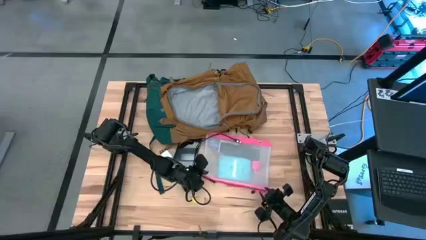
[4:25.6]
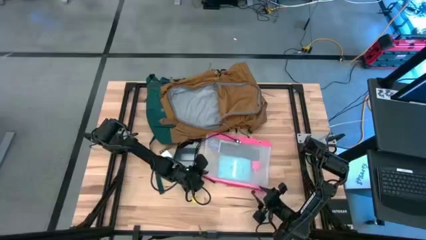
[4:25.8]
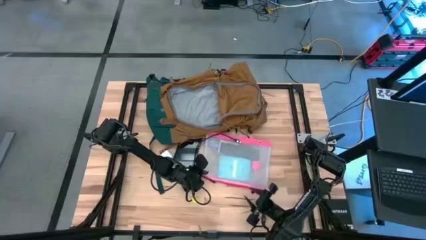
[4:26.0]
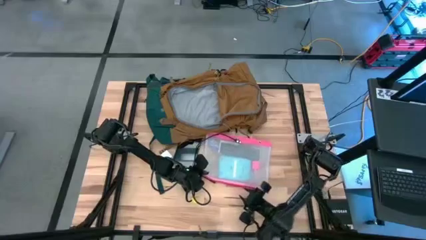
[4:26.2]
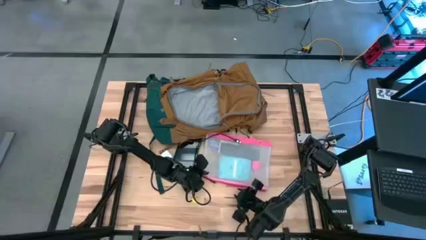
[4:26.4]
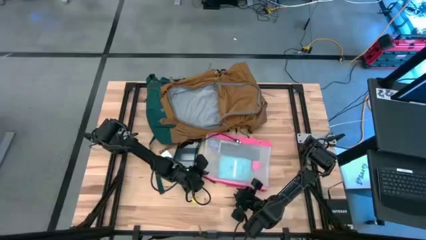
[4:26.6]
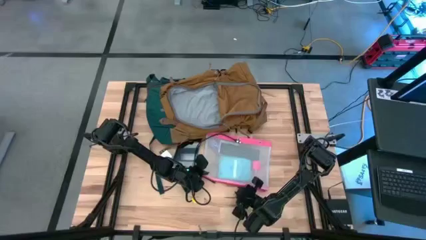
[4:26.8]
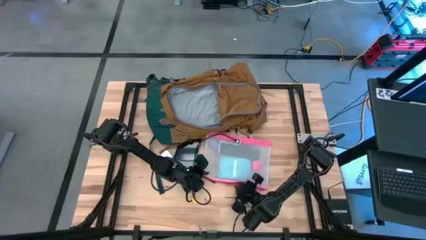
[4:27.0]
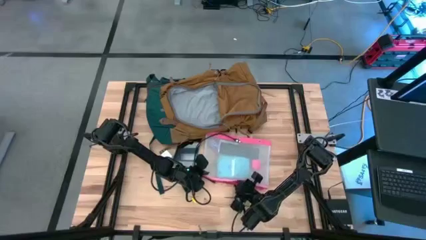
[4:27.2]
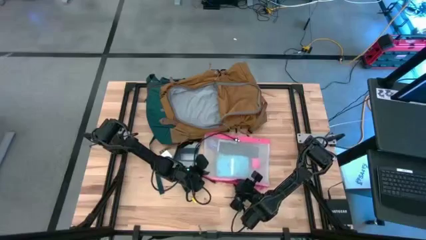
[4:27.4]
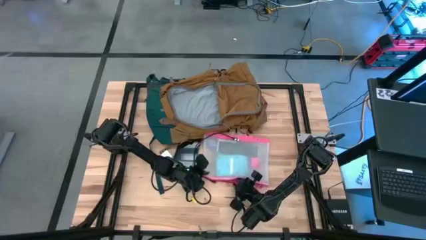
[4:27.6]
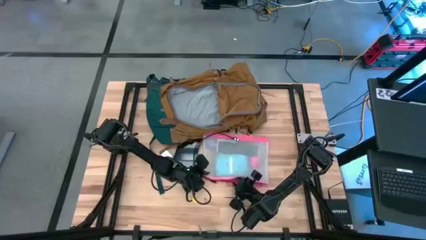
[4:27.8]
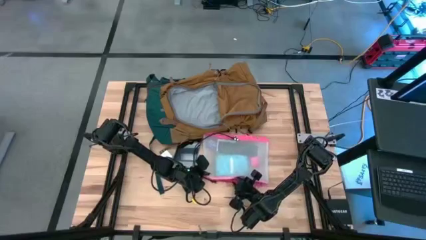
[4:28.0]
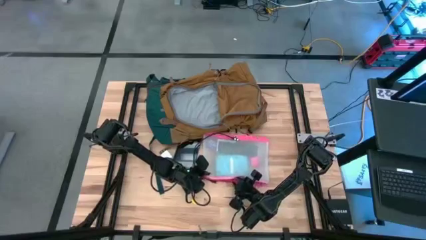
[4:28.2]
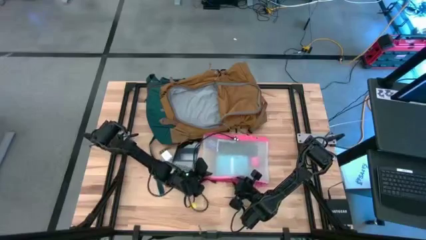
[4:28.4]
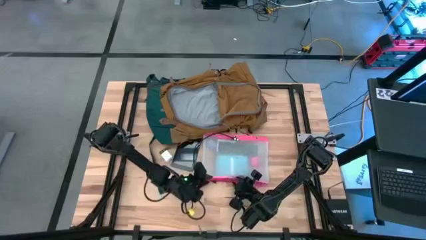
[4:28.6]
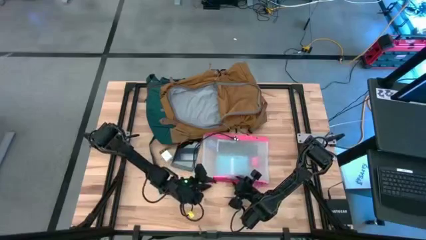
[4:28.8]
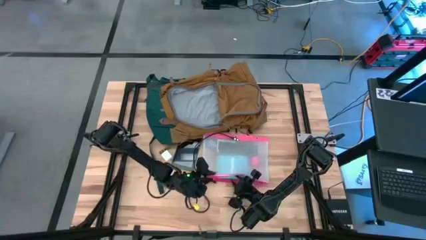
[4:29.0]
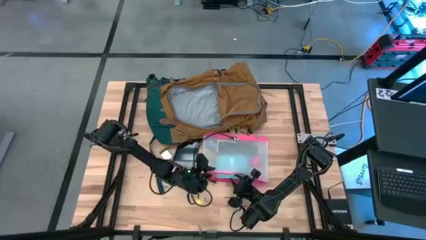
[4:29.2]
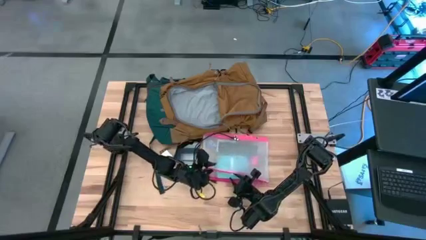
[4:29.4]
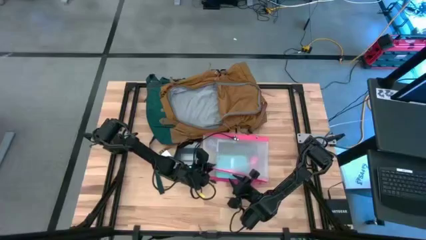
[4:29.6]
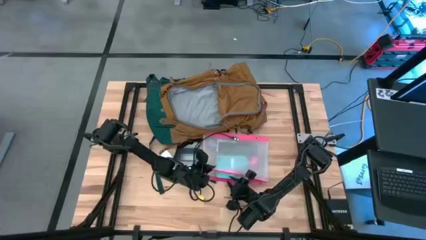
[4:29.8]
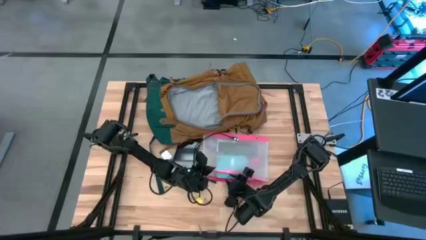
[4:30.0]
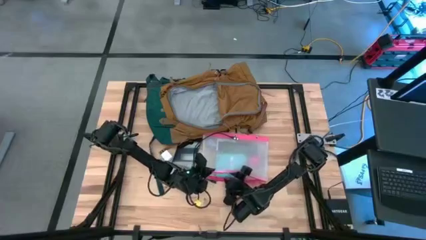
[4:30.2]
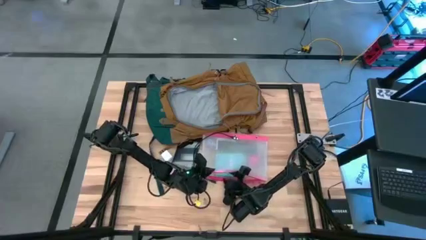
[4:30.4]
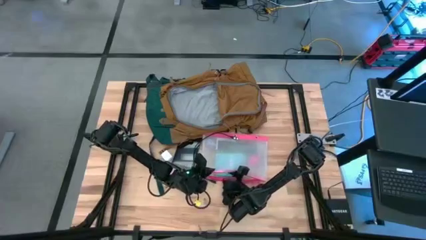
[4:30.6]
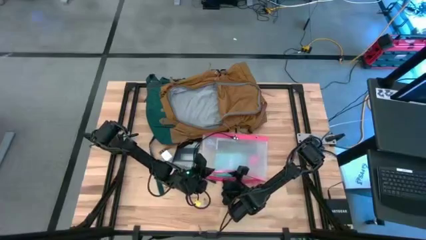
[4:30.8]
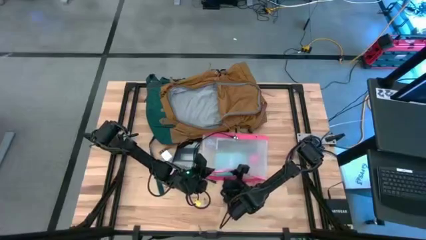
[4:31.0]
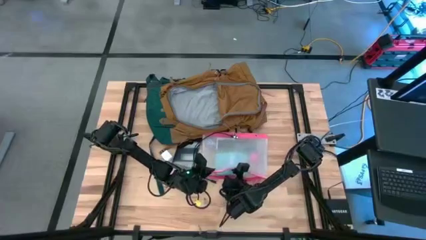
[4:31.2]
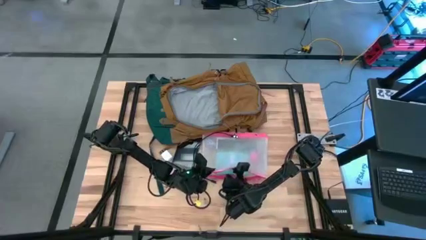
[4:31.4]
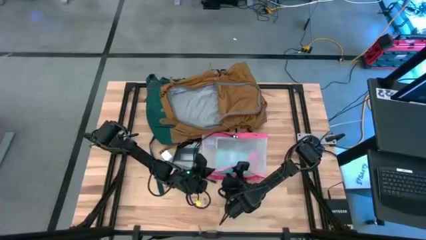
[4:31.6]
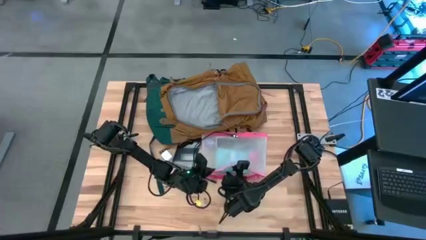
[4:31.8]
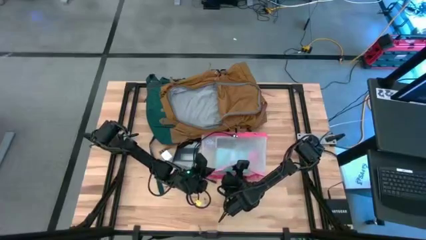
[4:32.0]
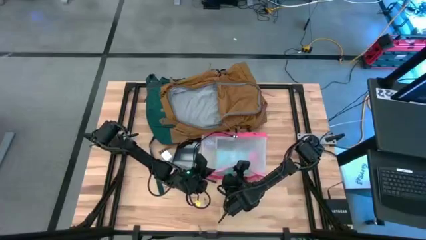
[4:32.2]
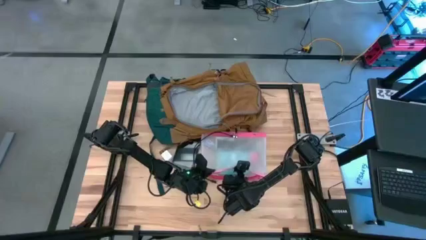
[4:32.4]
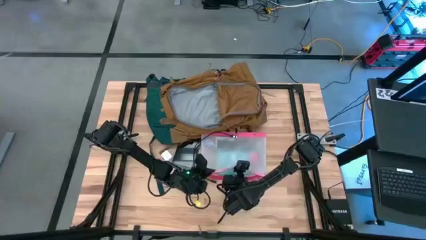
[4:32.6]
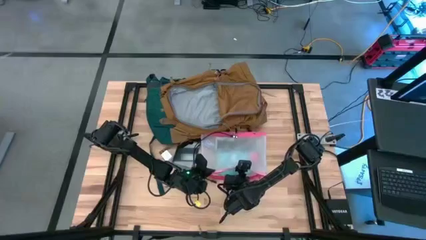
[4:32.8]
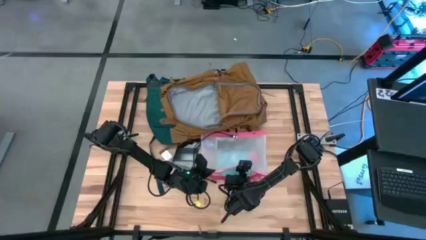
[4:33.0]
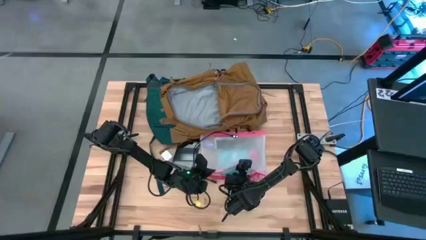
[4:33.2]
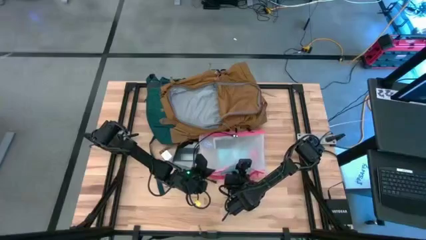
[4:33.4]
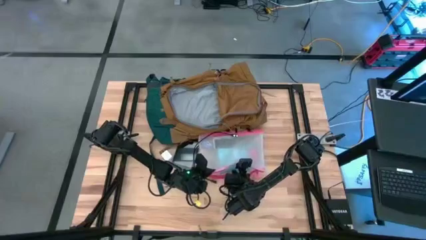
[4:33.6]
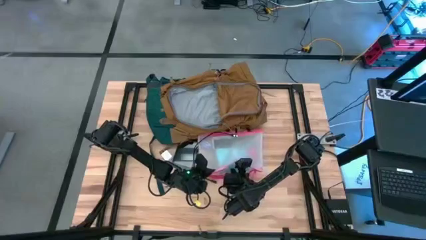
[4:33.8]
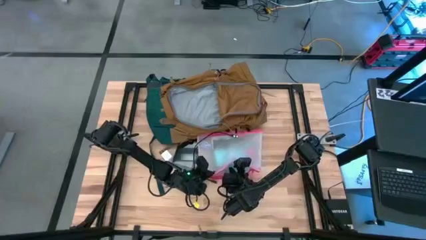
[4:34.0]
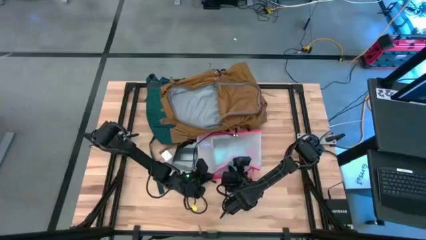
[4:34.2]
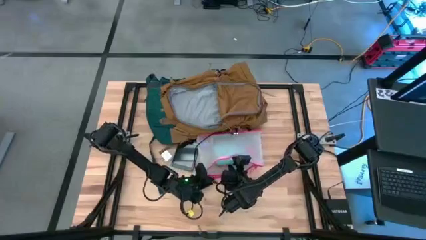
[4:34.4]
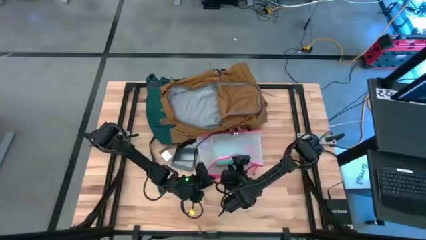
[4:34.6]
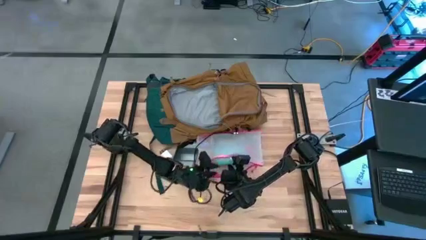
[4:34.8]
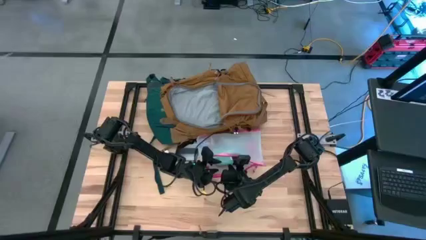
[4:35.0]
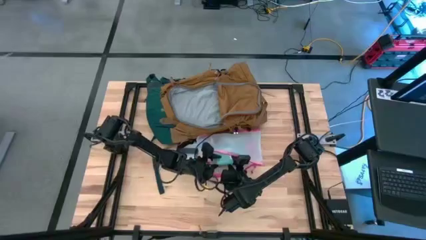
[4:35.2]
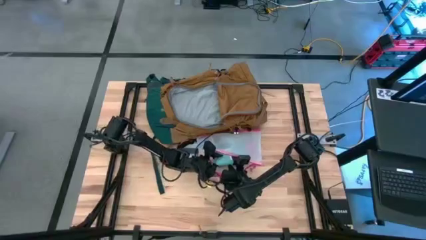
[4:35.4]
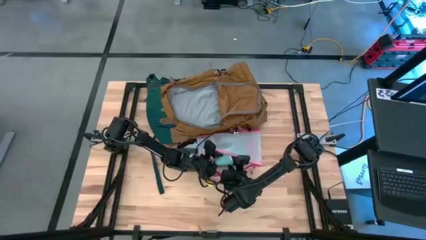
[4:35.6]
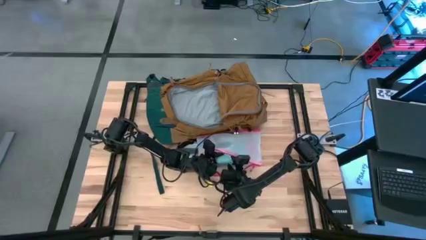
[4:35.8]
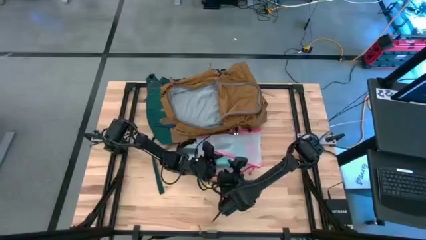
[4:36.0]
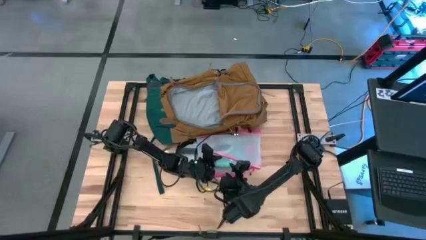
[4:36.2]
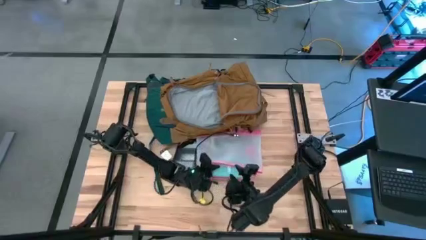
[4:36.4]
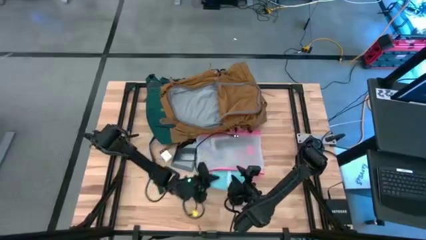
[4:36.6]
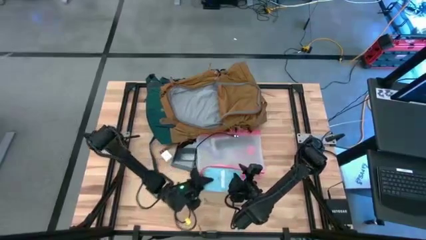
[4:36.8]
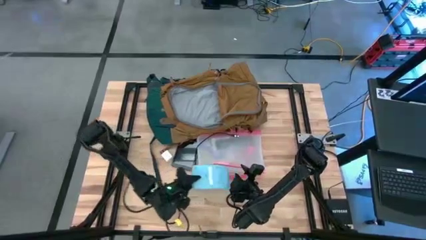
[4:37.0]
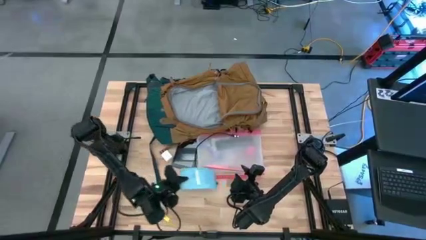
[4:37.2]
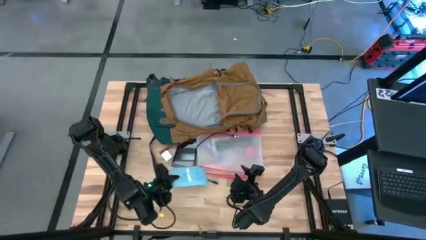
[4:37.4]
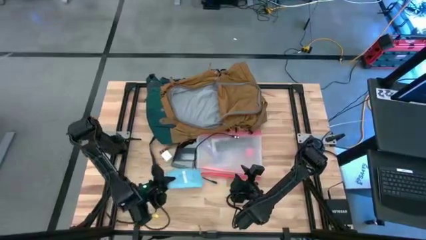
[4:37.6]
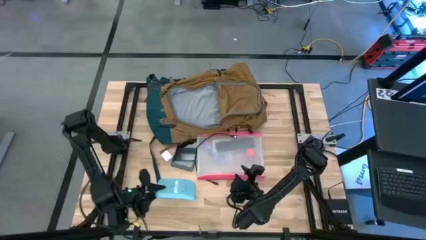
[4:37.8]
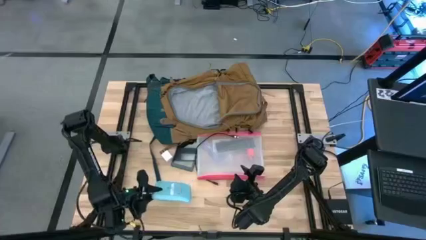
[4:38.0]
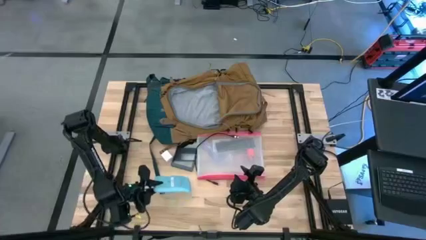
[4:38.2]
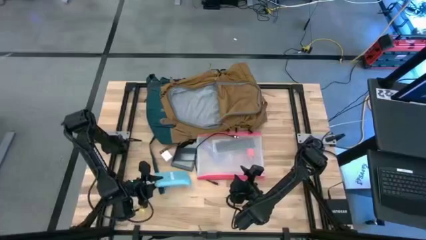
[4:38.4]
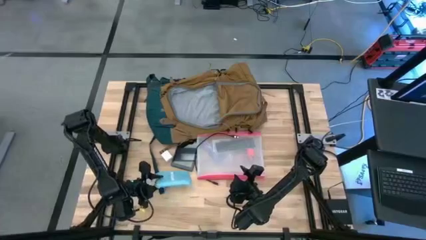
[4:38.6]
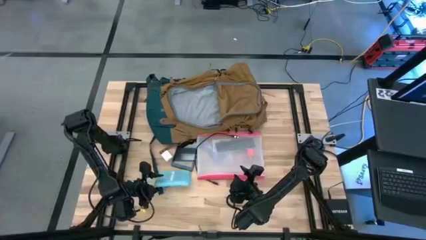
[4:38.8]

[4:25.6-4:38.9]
Task: Unpack backpack
Remove the blue calculator from the pink zipper pouch

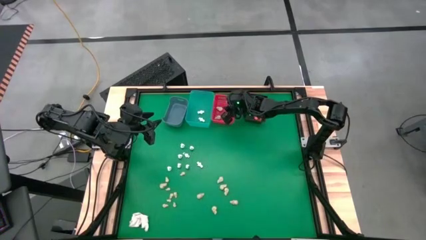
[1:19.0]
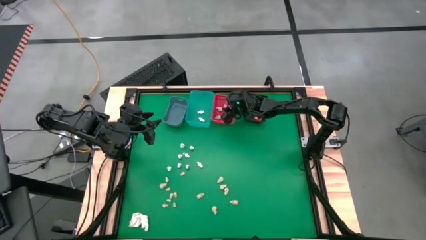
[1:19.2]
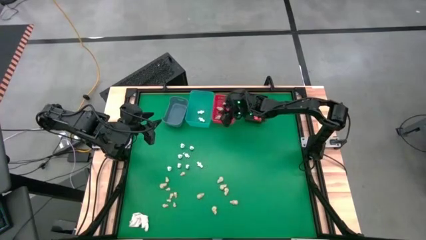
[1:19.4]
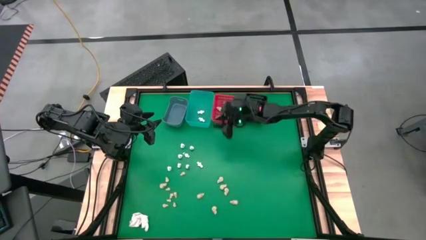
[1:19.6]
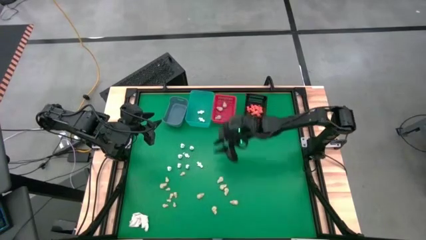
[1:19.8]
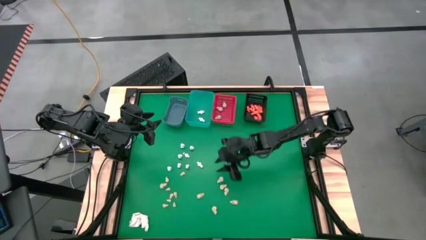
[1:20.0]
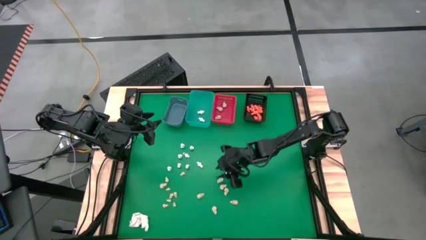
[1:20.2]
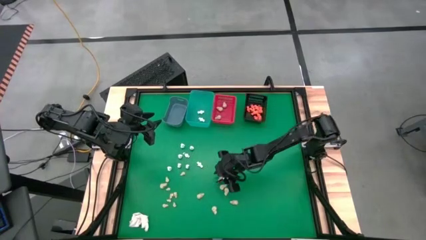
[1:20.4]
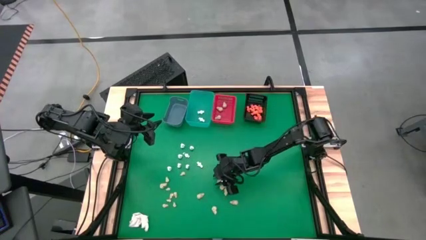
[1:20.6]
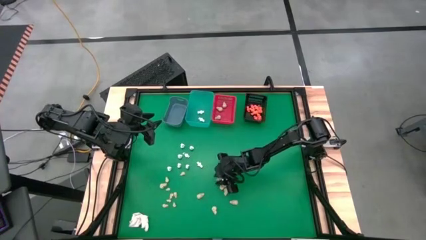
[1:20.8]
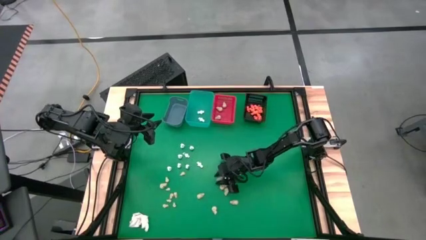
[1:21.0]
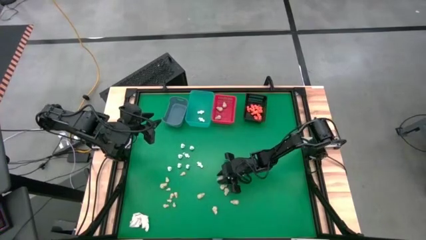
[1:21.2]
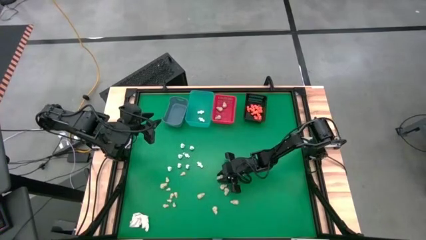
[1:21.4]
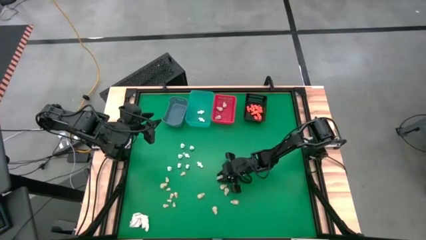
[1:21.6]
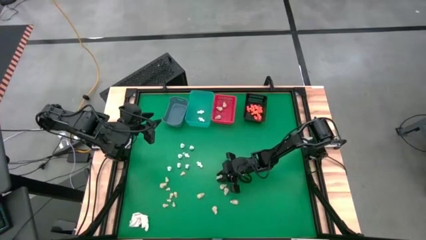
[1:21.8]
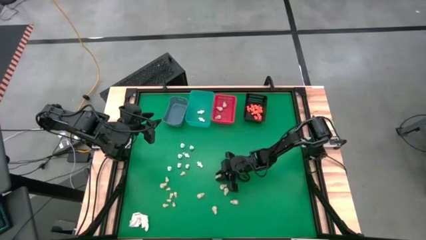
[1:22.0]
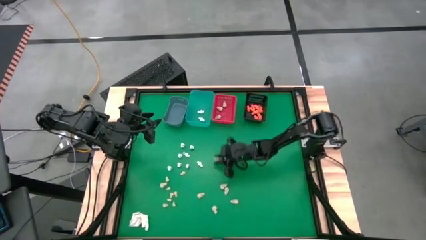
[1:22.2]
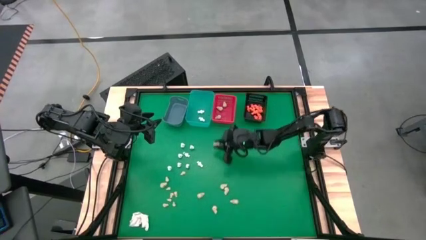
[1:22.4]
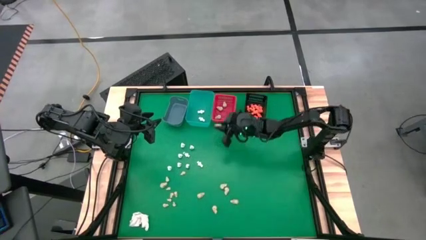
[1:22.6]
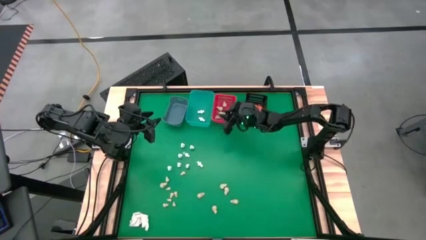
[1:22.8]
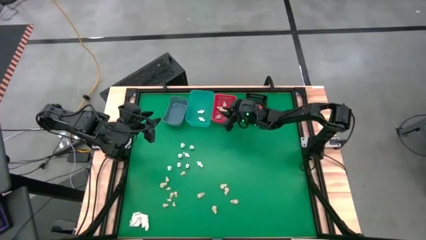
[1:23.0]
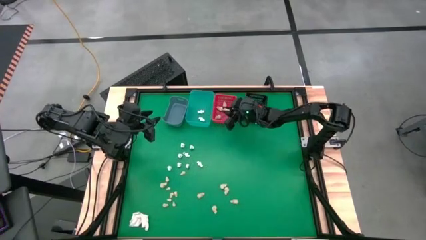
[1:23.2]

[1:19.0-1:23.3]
Task: Sort Halloween decoration
Put the white skull toy into the red bin
